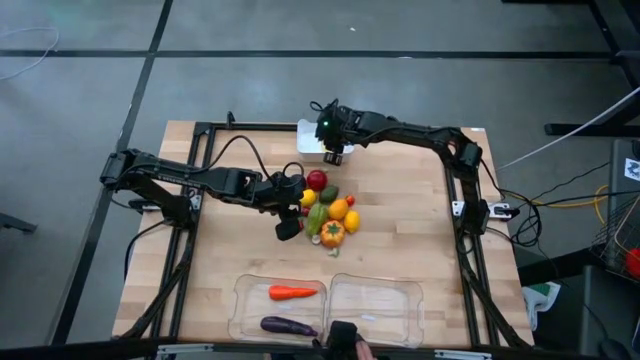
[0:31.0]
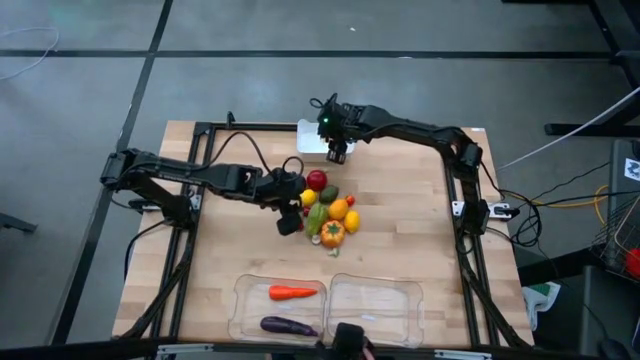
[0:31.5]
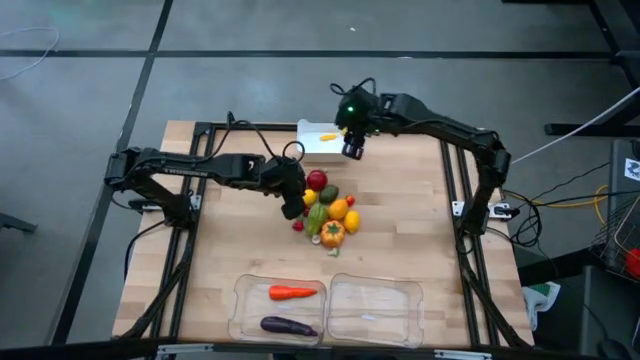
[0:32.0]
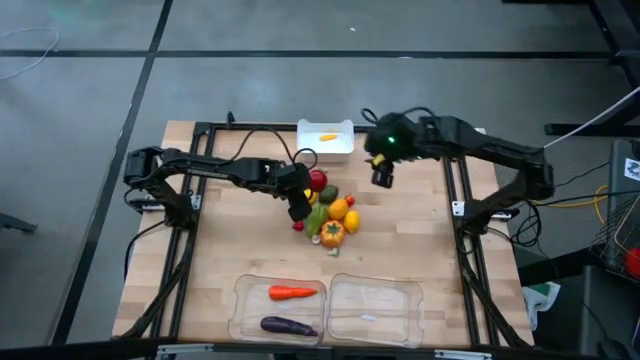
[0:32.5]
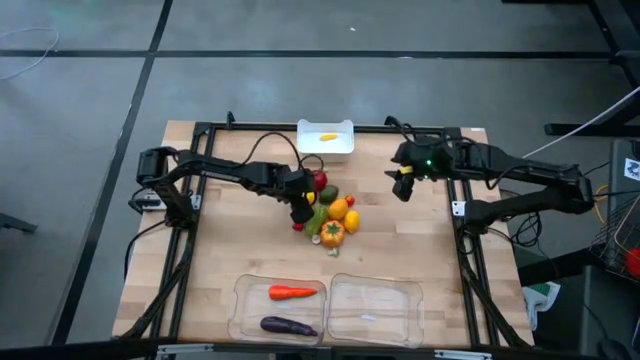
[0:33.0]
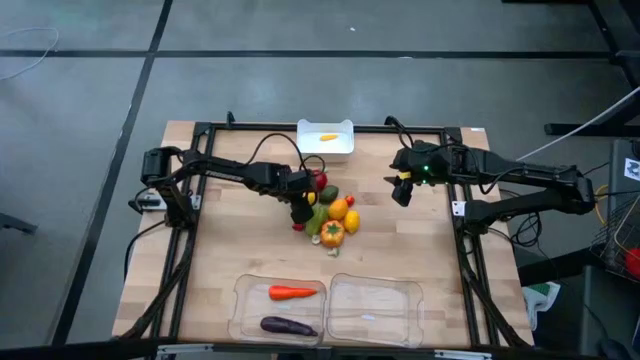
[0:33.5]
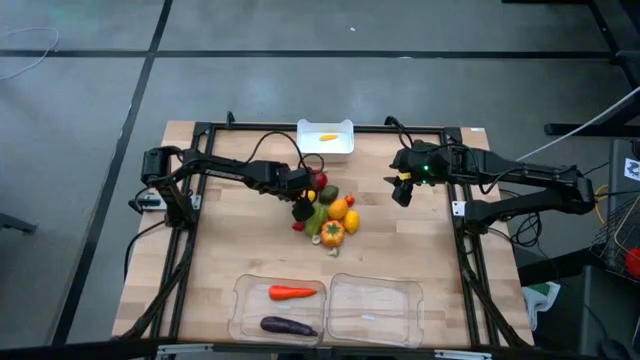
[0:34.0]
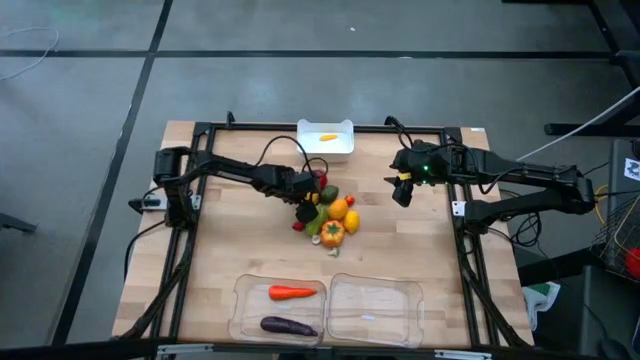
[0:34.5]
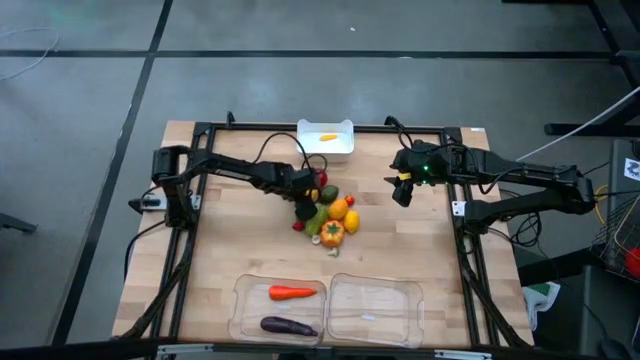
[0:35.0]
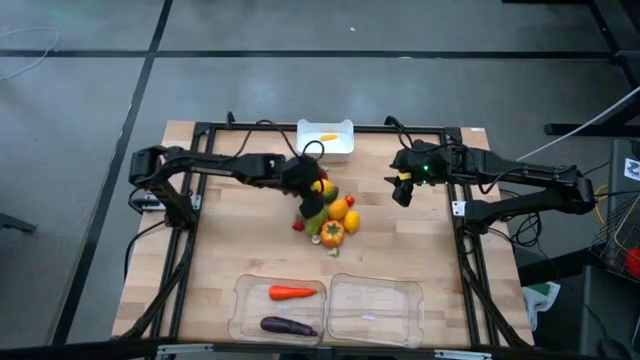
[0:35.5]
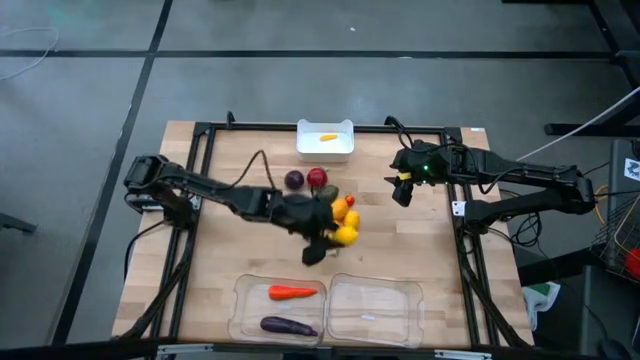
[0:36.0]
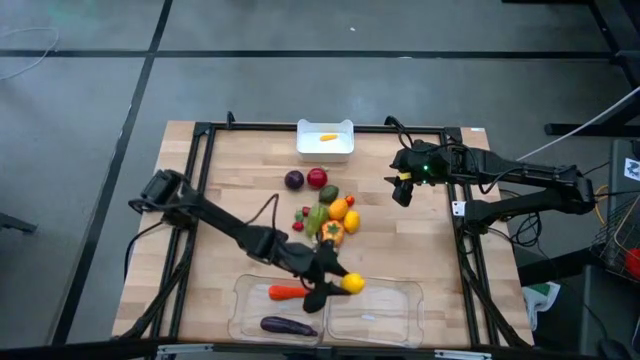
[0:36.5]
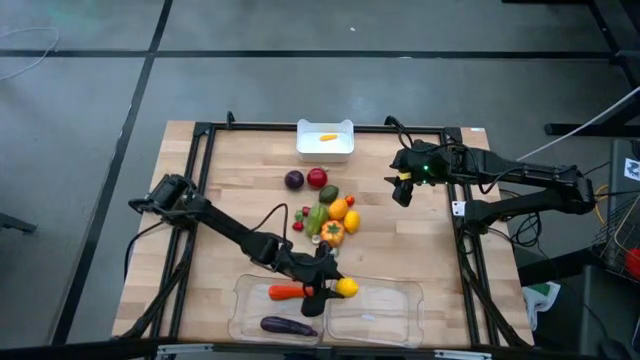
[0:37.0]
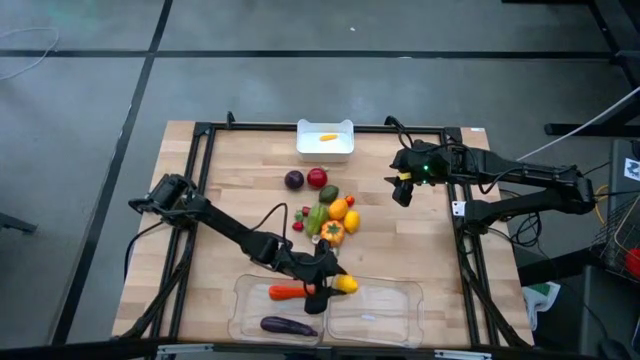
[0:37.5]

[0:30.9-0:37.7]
Task: Sort produce into baskets
Put the left yellow lemon into the right transparent bin

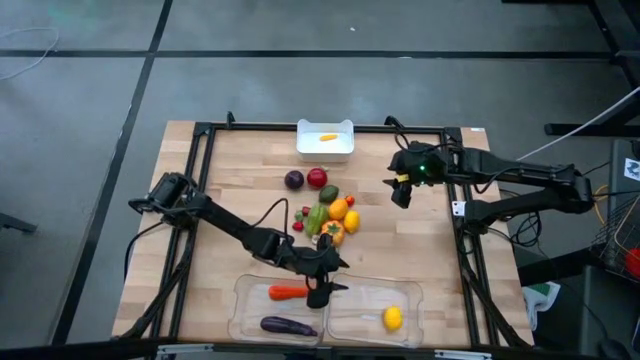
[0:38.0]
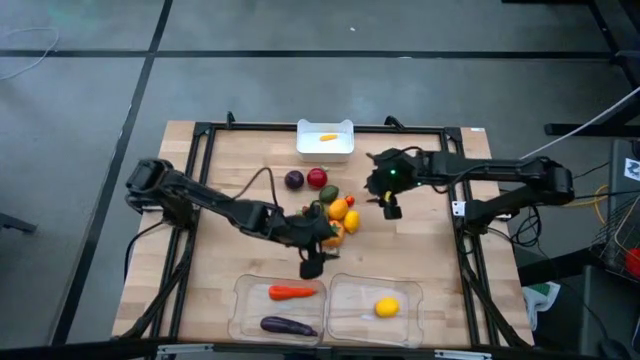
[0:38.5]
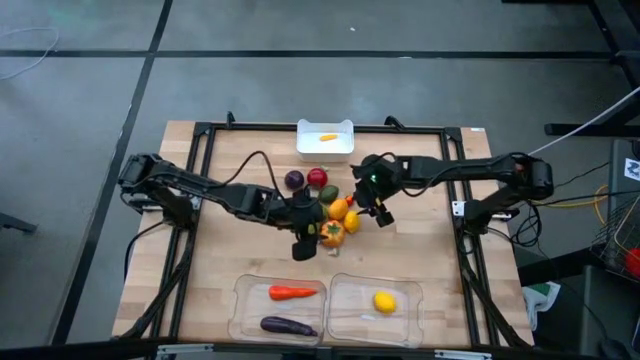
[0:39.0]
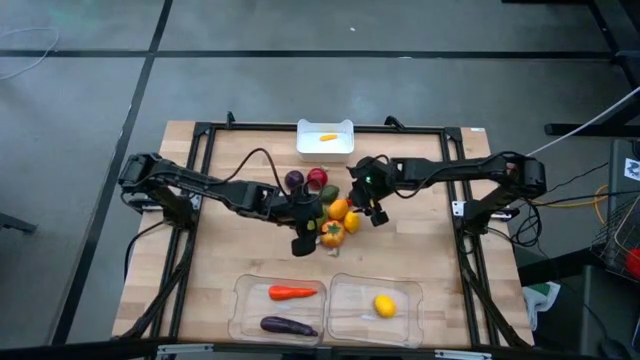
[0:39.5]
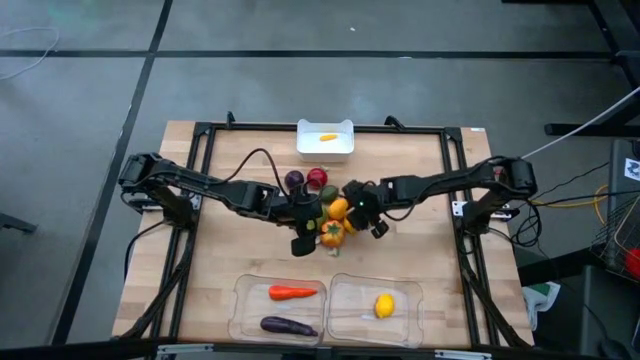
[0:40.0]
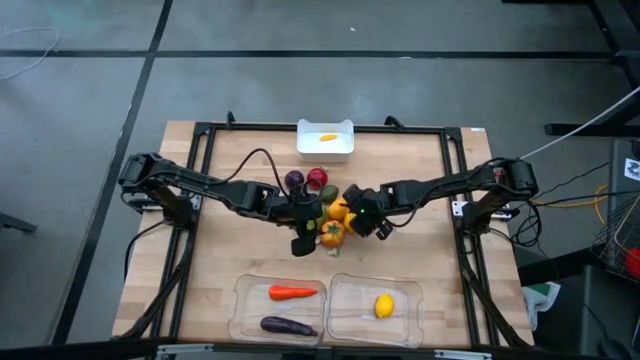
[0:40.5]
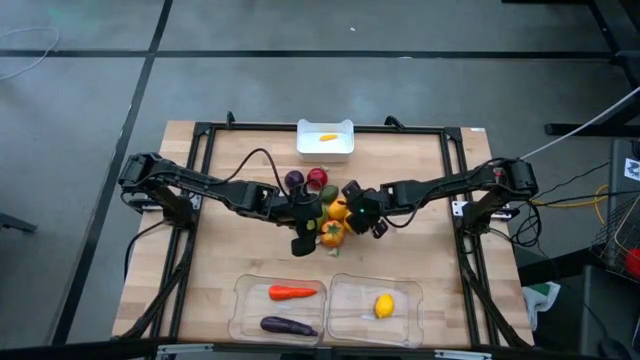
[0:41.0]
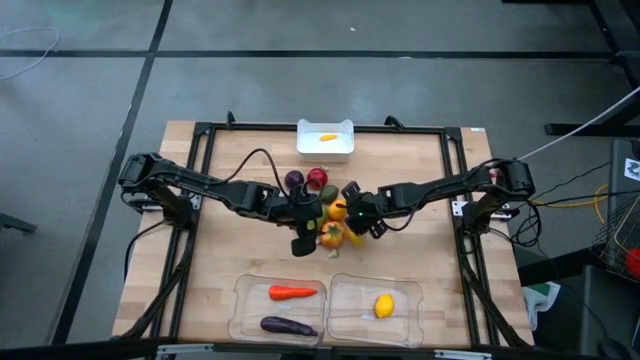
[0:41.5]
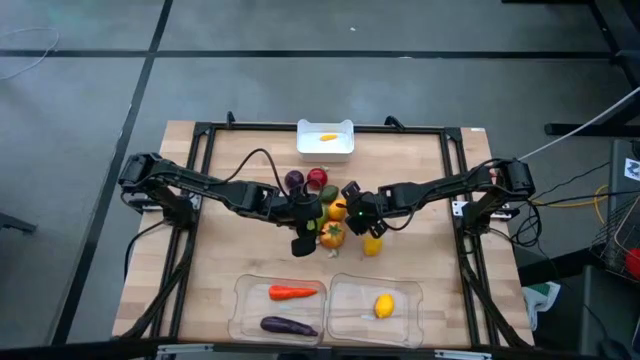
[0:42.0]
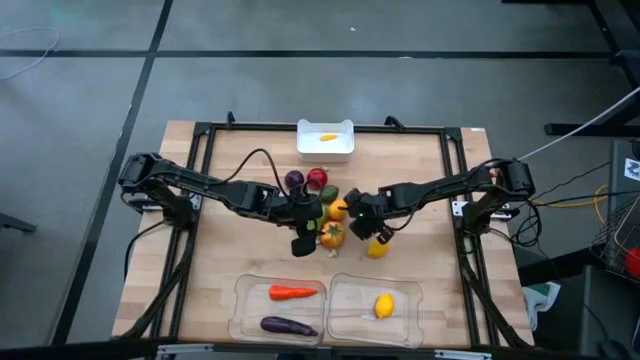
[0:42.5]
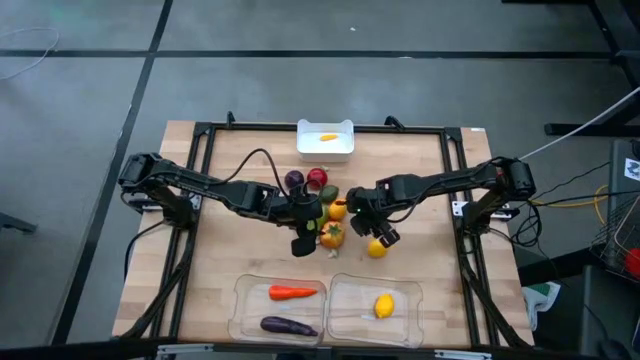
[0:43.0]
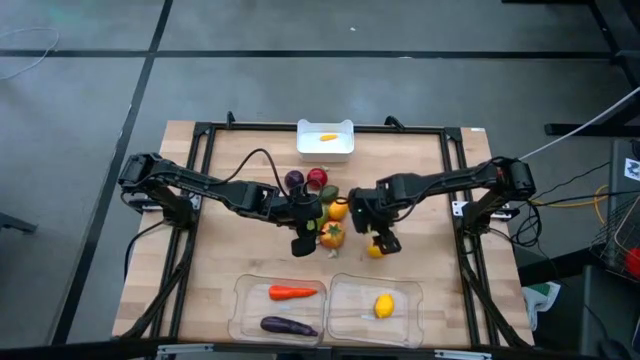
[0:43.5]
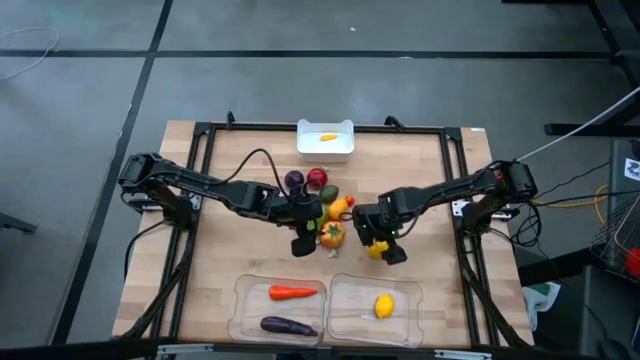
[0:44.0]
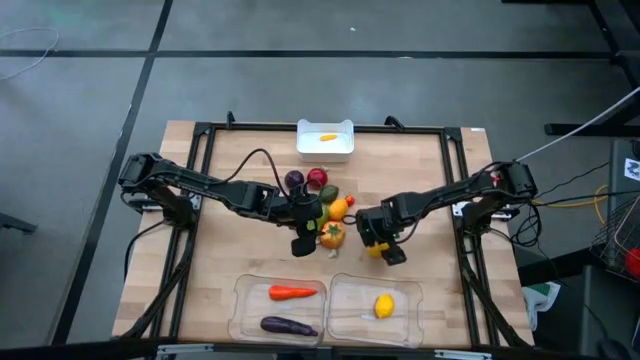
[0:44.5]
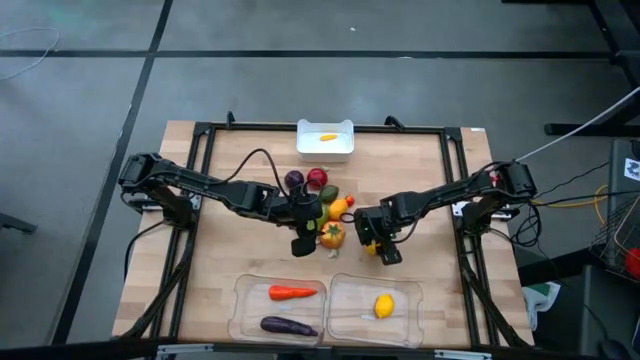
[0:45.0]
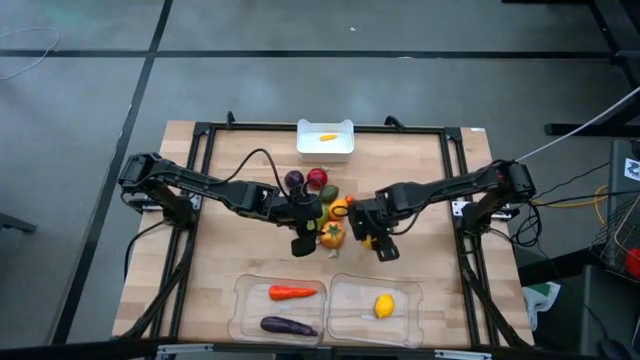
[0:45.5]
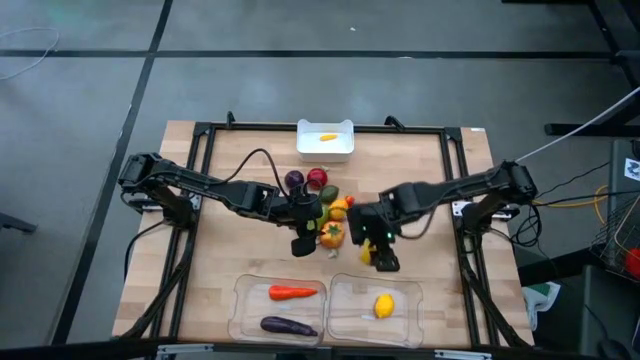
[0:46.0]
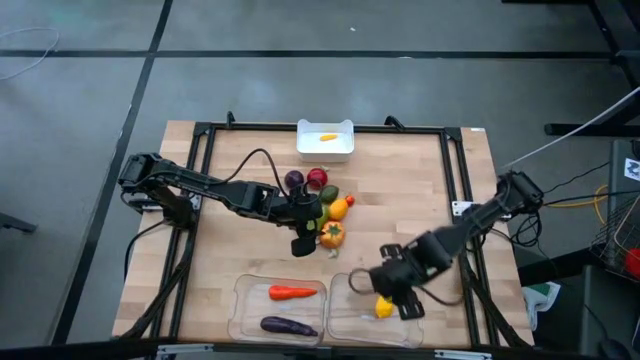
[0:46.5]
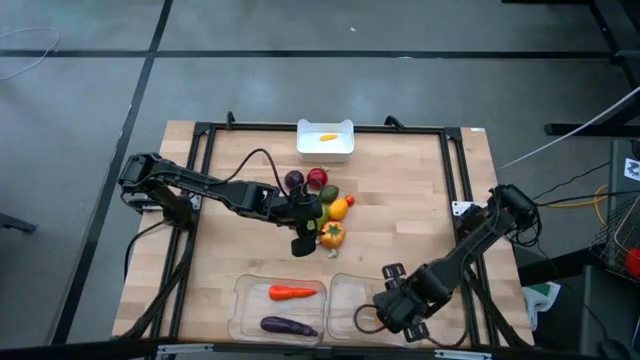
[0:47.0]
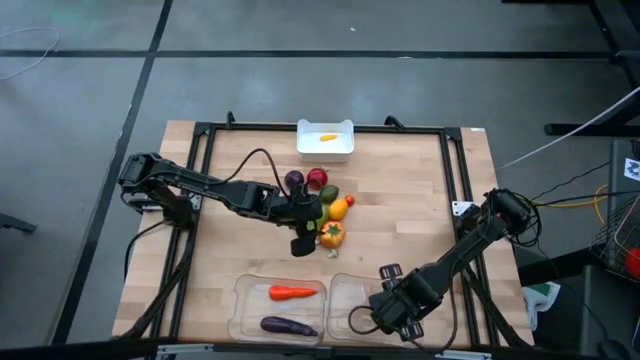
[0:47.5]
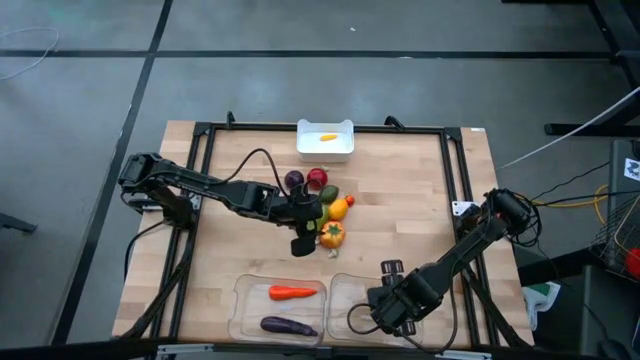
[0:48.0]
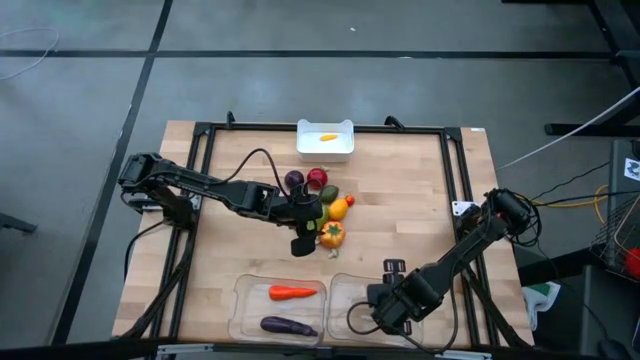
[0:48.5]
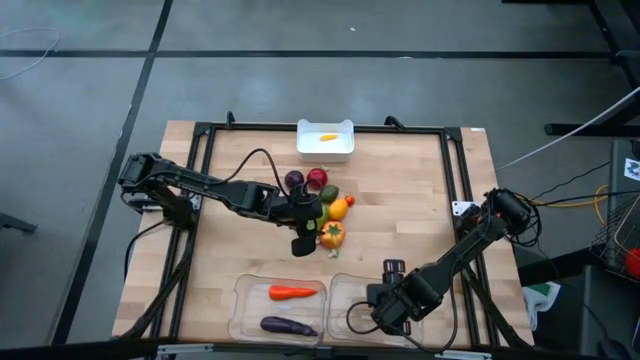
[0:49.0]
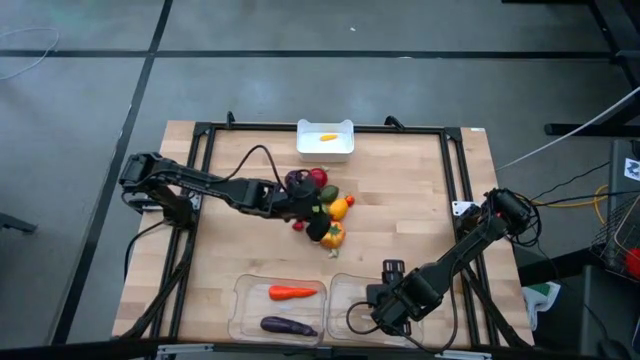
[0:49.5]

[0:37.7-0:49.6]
Put the right yellow lemon into the right transparent bin

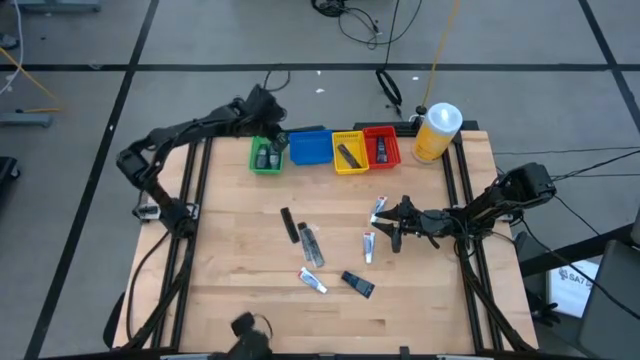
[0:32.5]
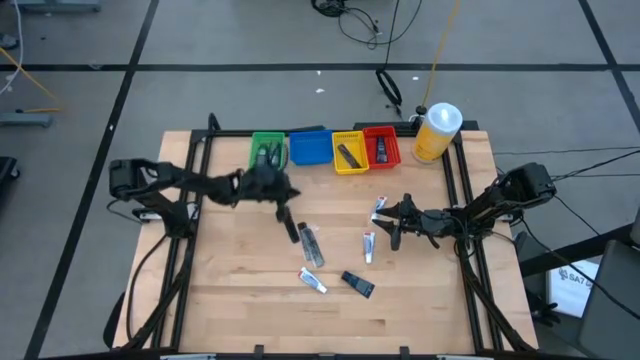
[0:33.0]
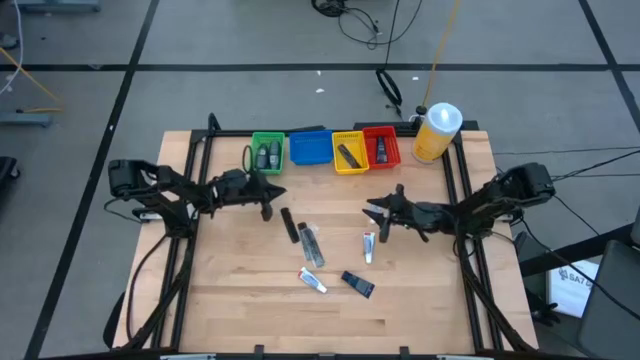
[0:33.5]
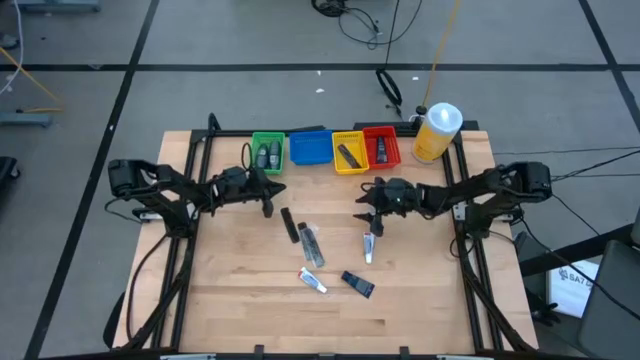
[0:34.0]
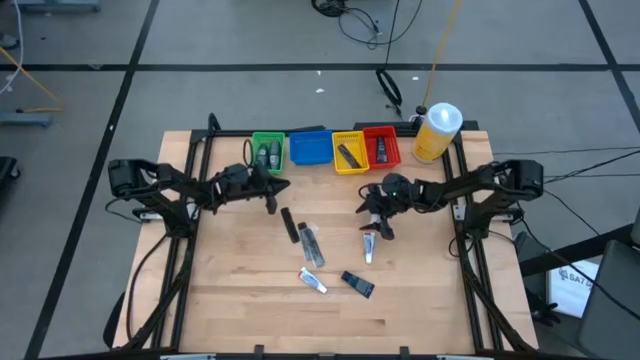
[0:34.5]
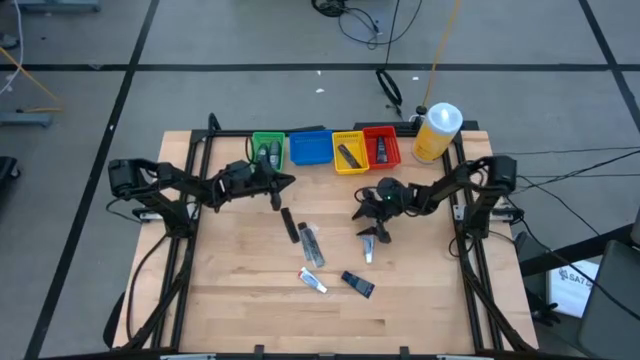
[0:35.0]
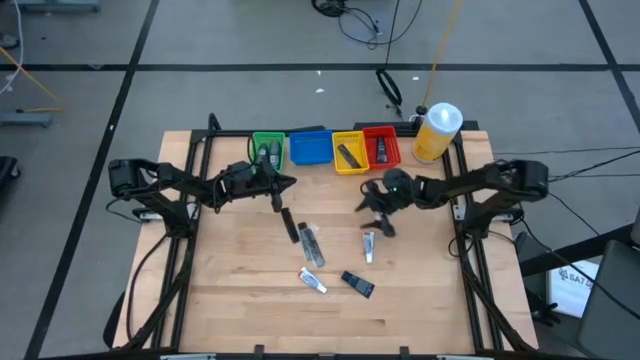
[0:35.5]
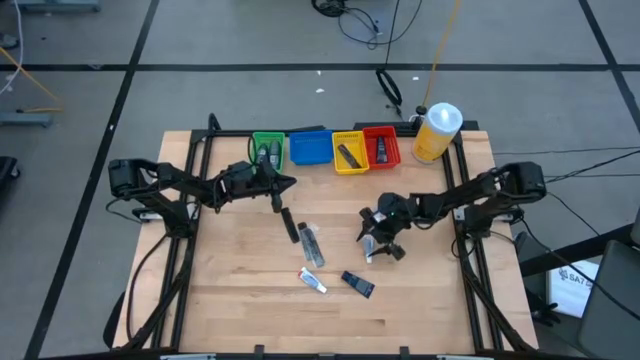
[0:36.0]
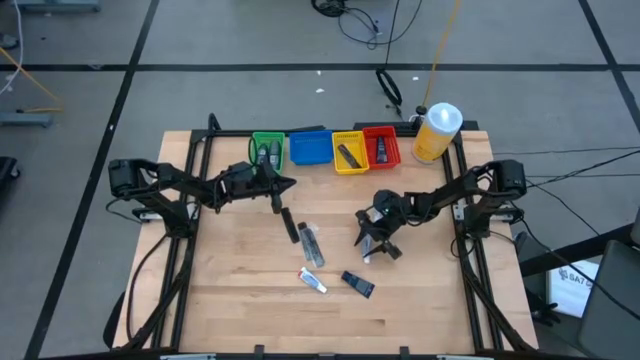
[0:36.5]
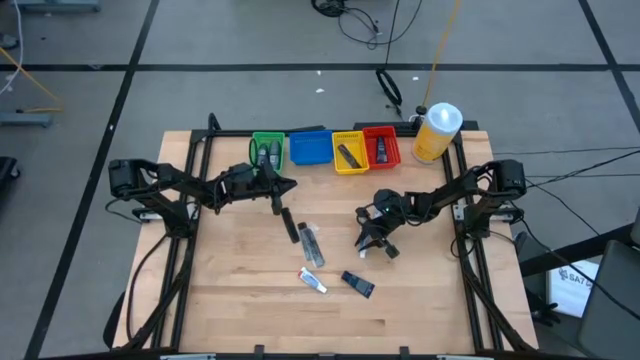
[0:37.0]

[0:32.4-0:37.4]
Task: Pick & Place Travel size toiletries
Put the bottom right white toothpaste into the blue bin
